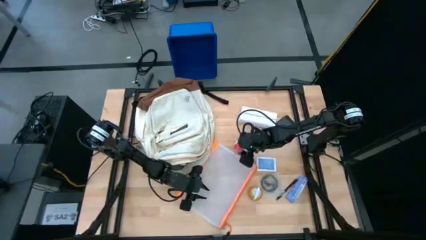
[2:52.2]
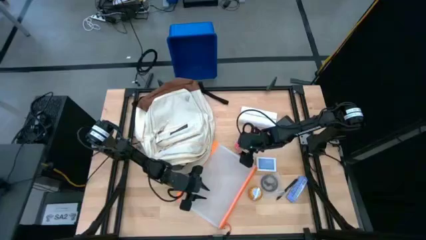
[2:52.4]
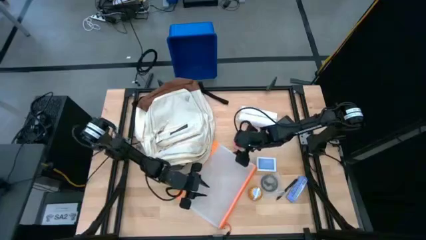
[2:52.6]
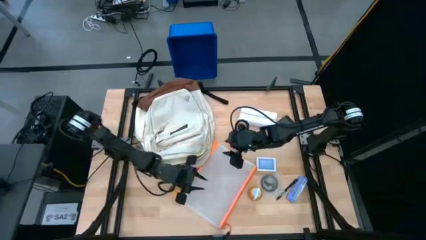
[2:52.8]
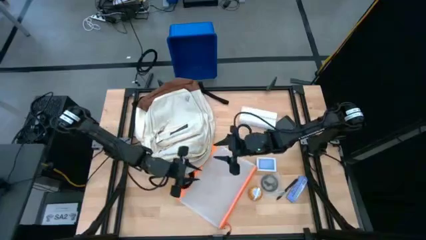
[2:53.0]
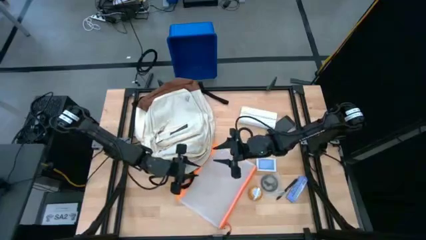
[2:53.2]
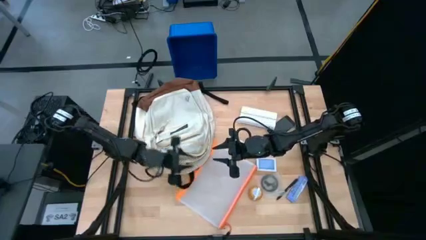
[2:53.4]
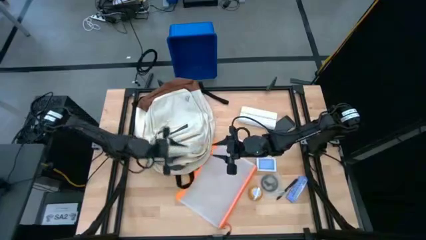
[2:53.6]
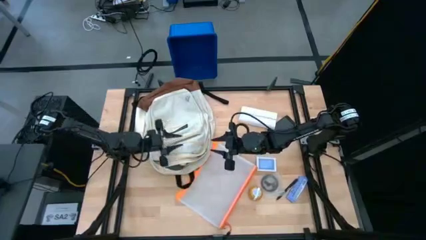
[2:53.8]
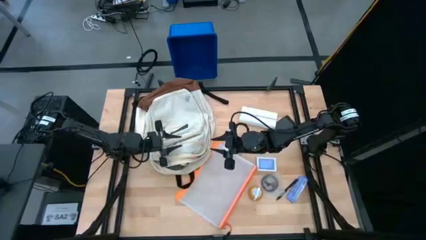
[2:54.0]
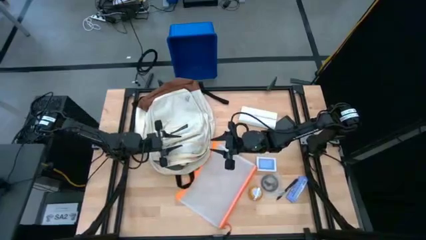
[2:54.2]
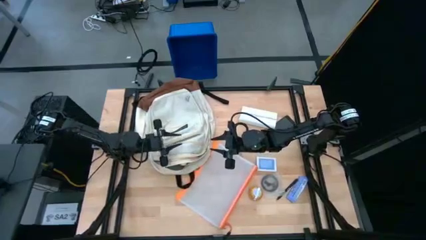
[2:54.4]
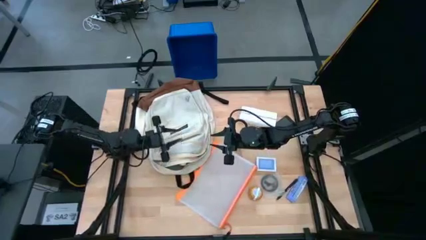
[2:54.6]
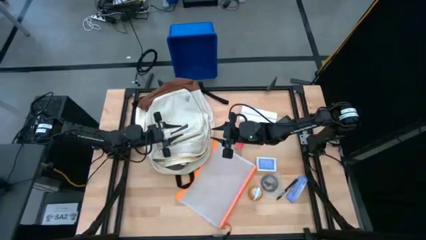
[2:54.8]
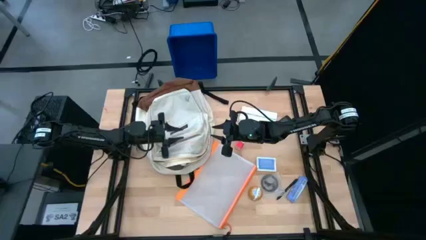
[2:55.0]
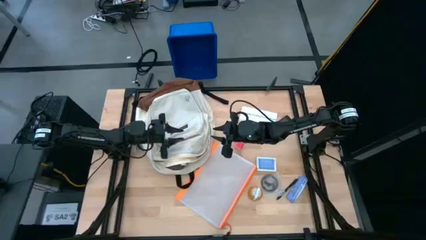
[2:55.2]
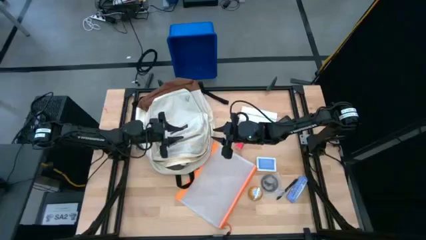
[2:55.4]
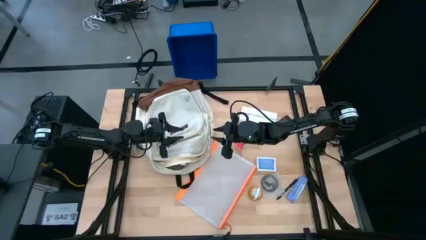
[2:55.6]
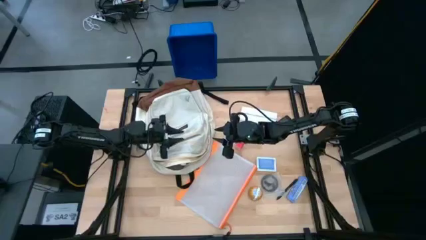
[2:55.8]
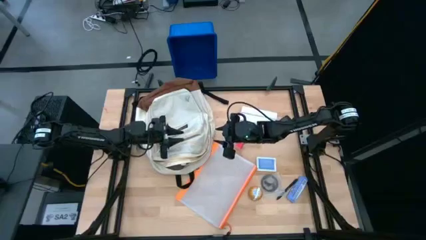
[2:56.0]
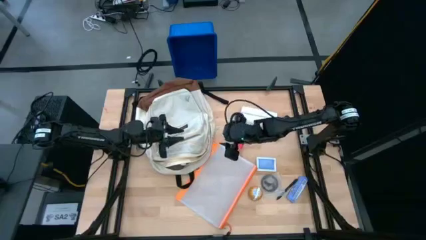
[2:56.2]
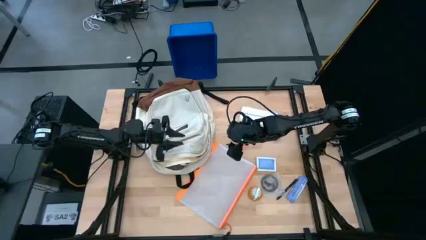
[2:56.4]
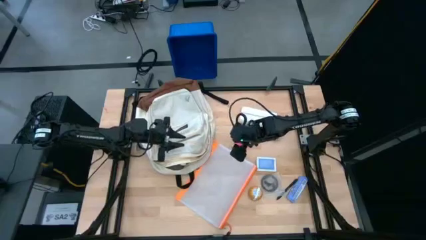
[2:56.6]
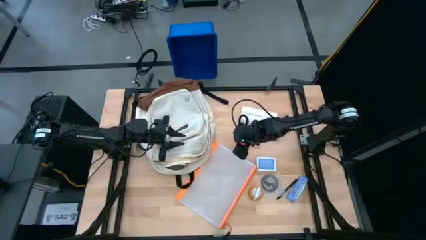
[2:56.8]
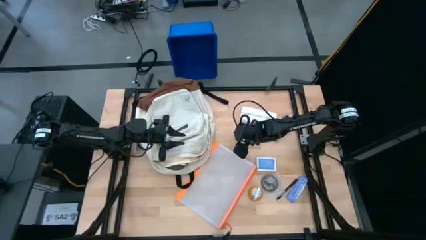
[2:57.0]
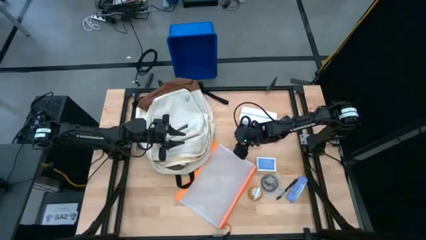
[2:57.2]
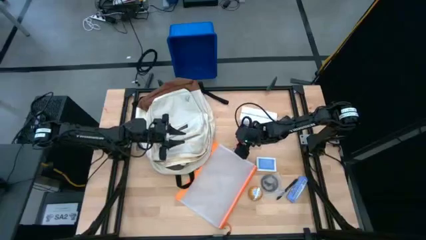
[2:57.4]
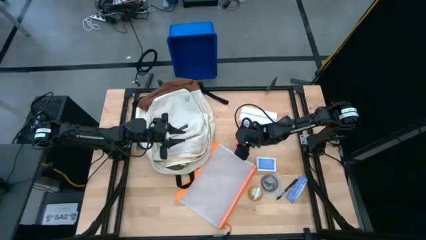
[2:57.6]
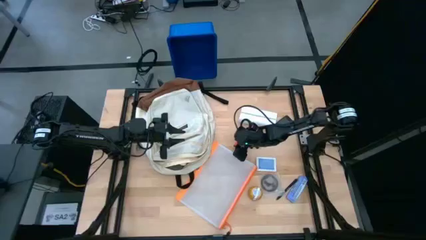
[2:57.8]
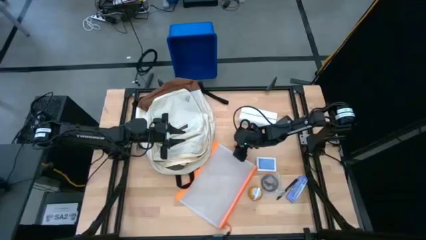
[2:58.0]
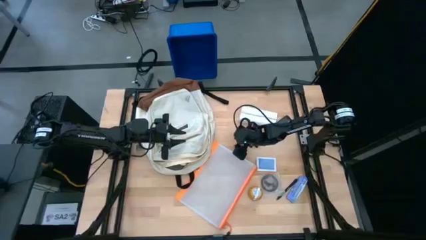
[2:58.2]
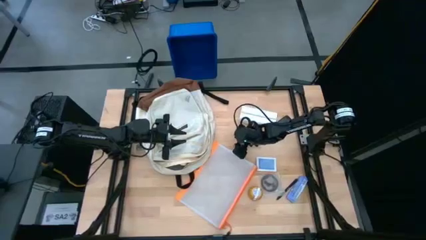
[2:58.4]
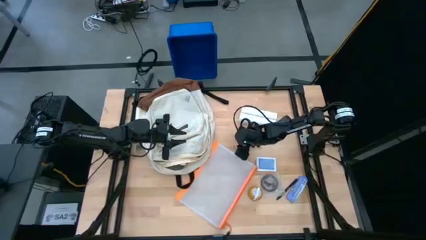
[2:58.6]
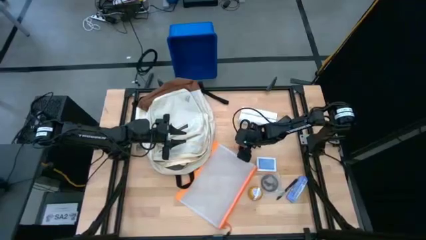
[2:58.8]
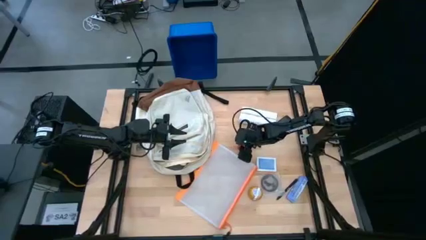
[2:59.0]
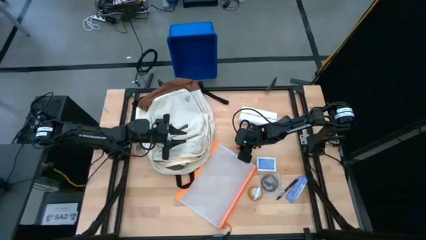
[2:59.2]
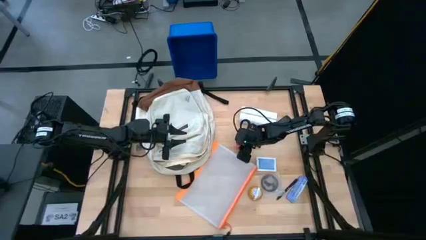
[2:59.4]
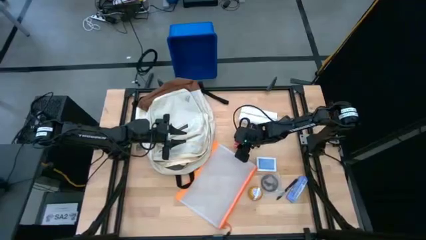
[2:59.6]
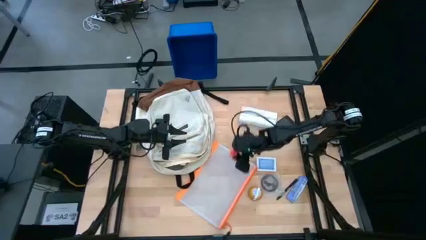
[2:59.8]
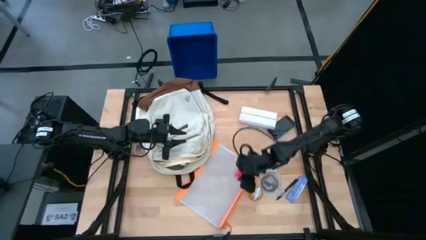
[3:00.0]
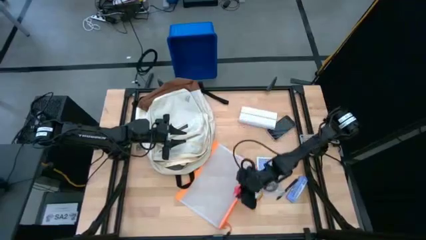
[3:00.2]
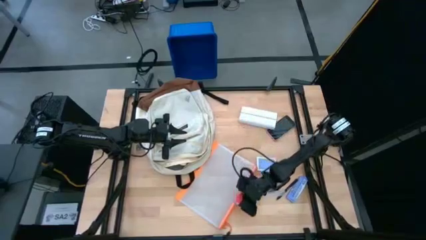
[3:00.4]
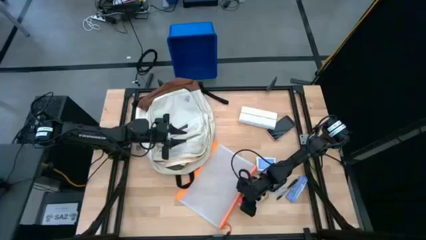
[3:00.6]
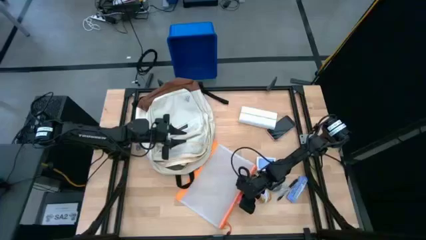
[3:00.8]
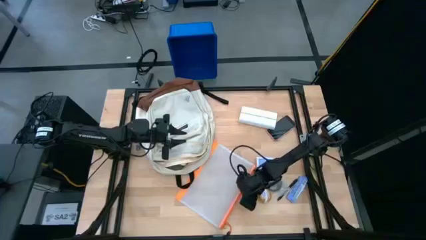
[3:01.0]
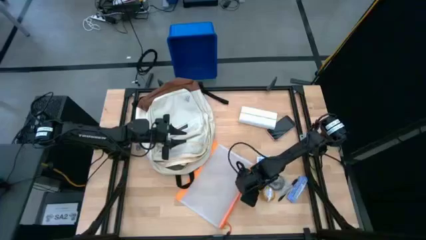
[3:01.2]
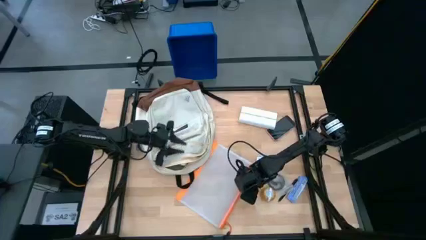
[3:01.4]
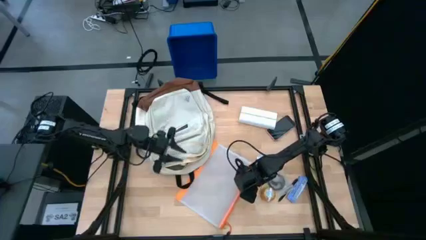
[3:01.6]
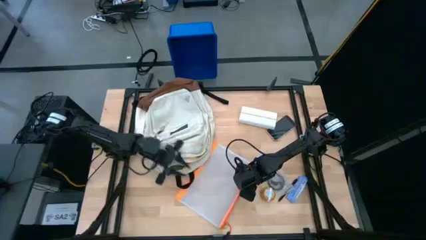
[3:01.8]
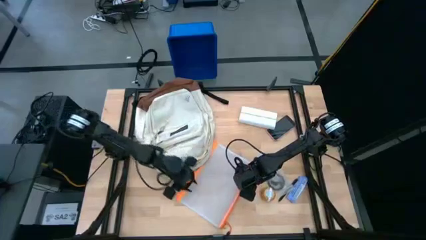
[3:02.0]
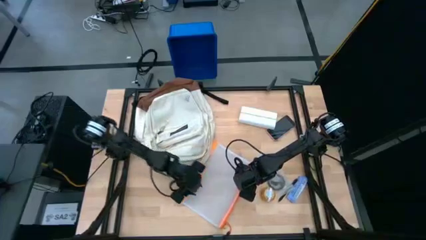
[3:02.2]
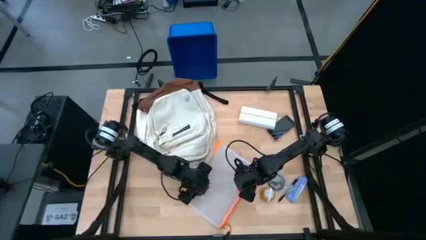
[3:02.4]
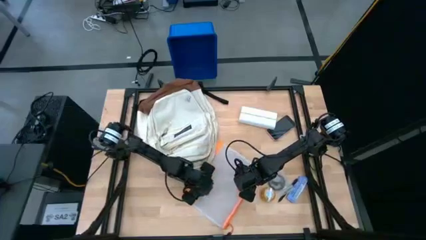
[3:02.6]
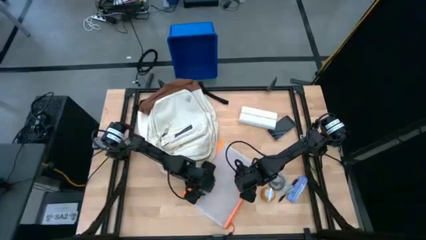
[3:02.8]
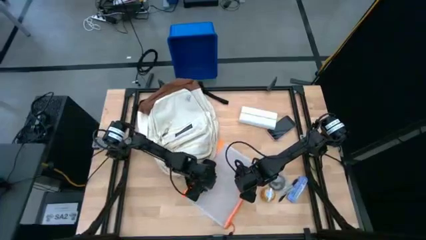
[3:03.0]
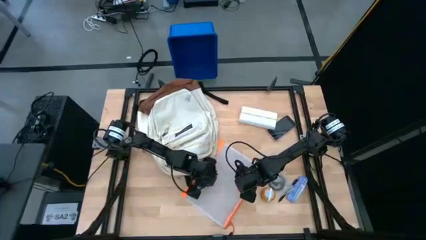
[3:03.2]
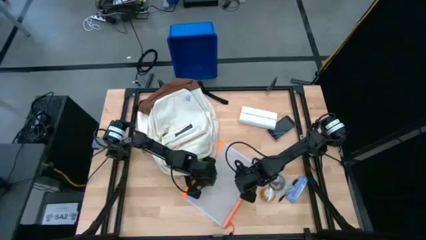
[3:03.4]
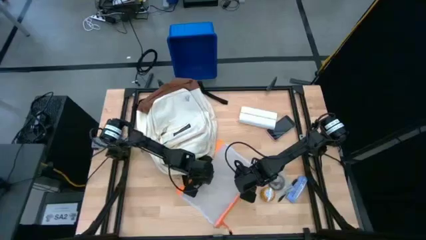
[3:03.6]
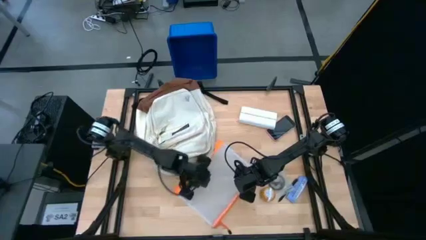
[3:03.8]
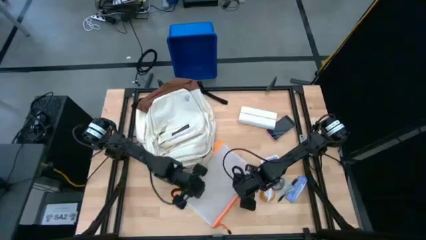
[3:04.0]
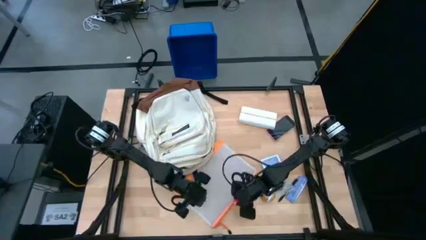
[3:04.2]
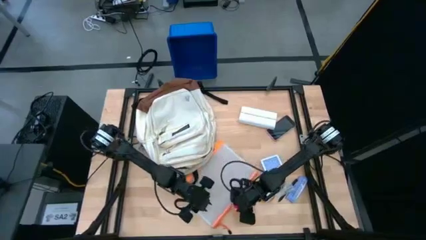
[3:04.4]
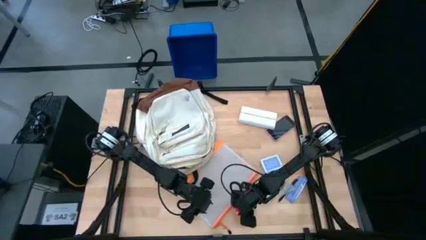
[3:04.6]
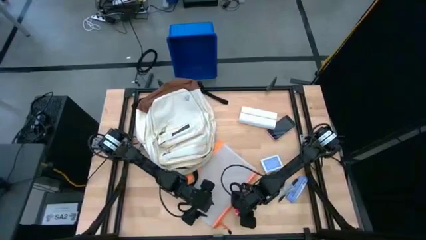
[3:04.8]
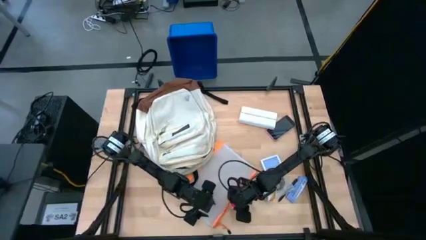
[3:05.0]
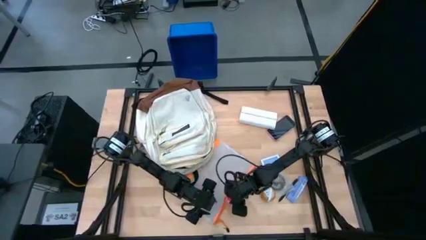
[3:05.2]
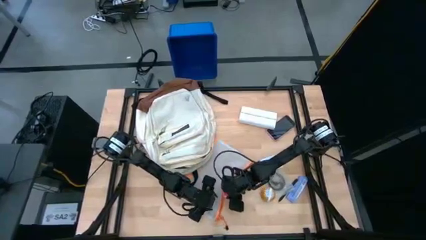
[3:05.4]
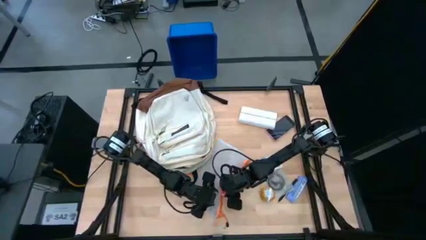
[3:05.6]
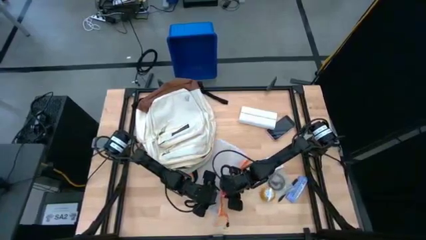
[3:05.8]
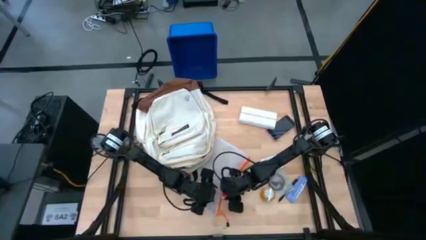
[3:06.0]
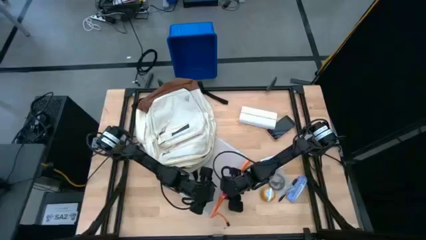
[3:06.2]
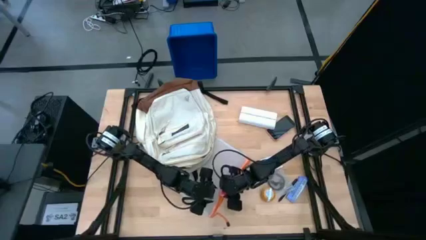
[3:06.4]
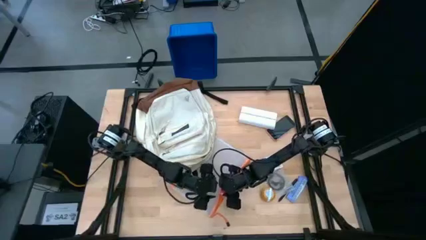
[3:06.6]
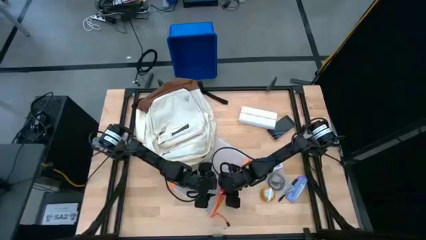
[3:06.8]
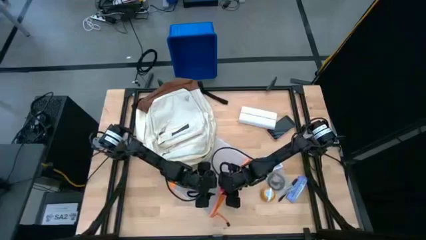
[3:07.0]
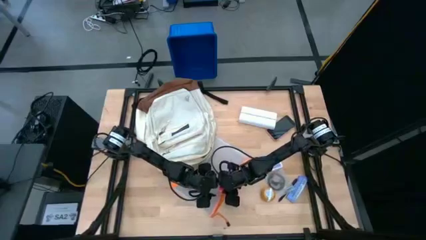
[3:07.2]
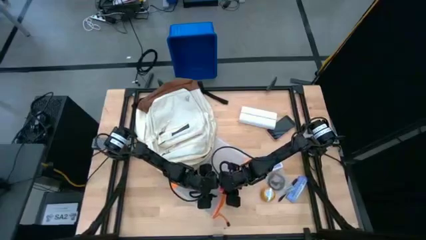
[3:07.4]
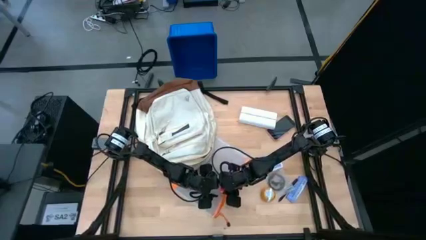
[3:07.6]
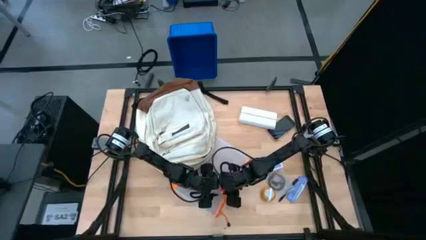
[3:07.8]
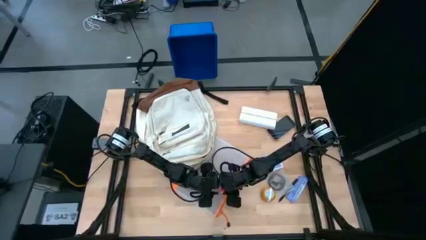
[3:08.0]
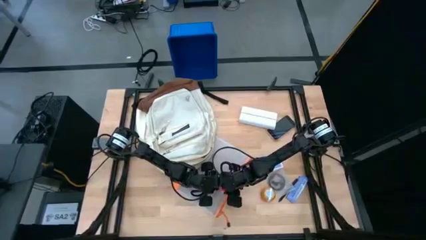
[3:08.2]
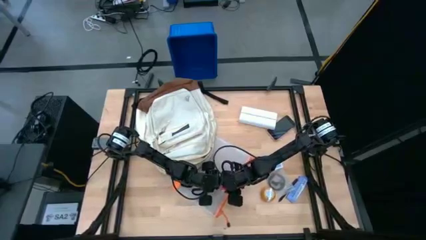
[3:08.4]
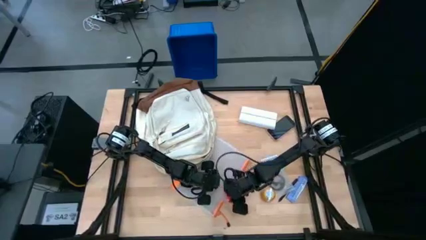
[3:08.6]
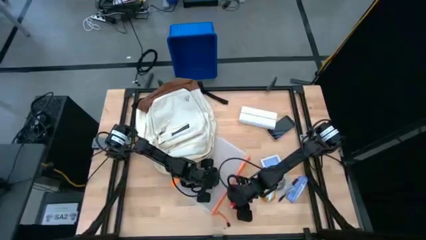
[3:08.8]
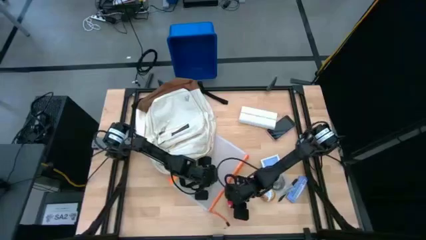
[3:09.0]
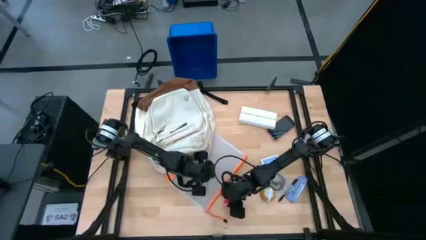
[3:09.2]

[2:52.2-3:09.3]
Task: Unpack backpack
Put the red charger adaptor into the zip bag
